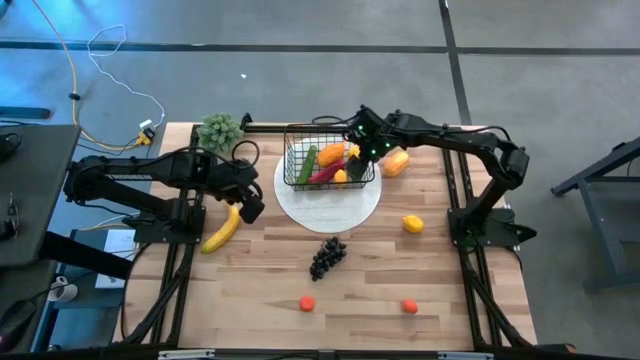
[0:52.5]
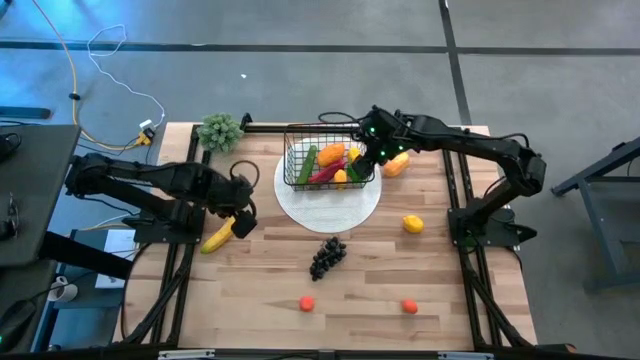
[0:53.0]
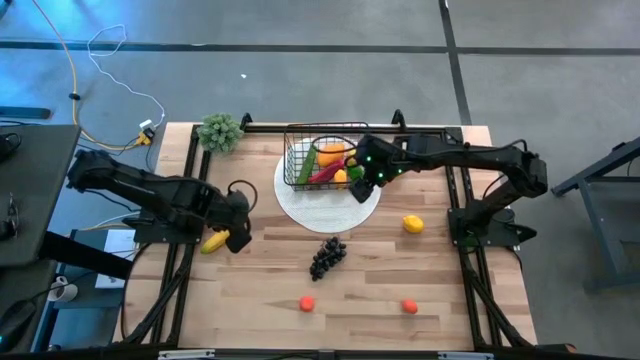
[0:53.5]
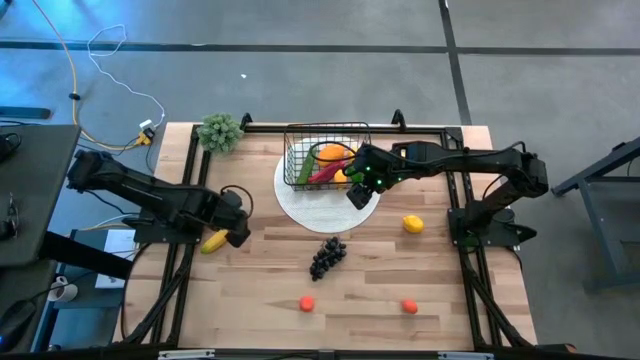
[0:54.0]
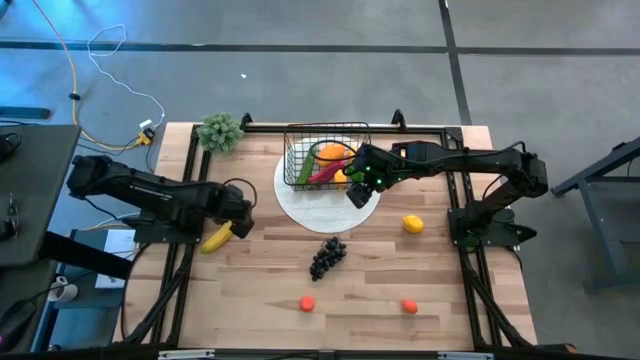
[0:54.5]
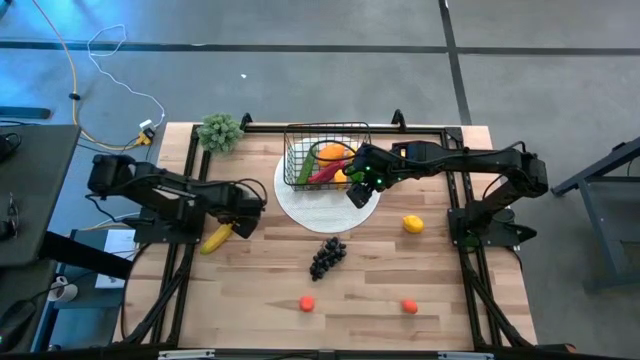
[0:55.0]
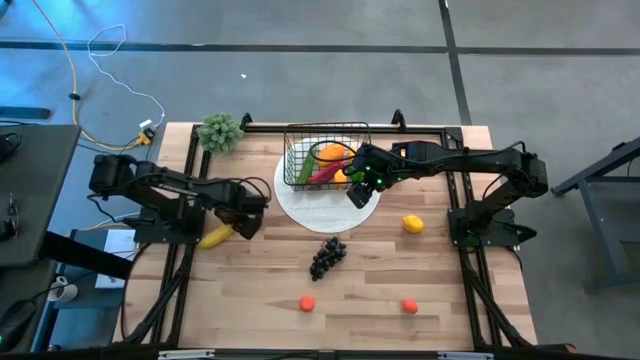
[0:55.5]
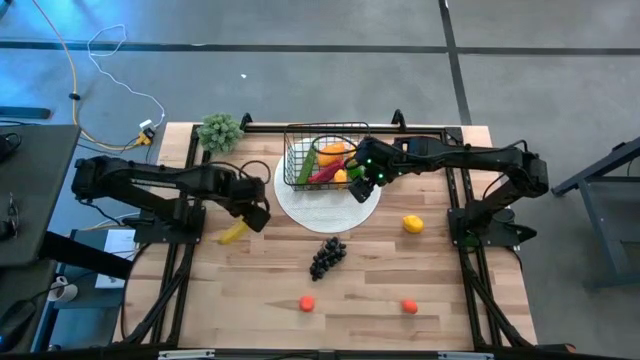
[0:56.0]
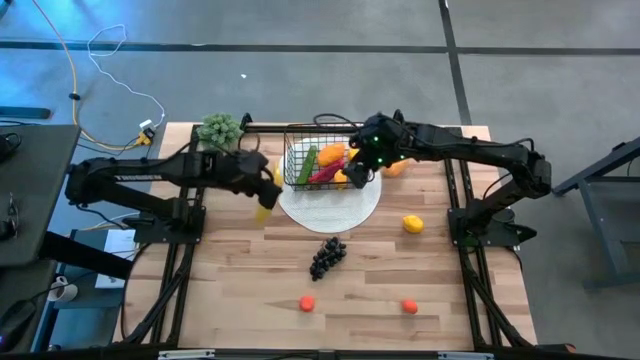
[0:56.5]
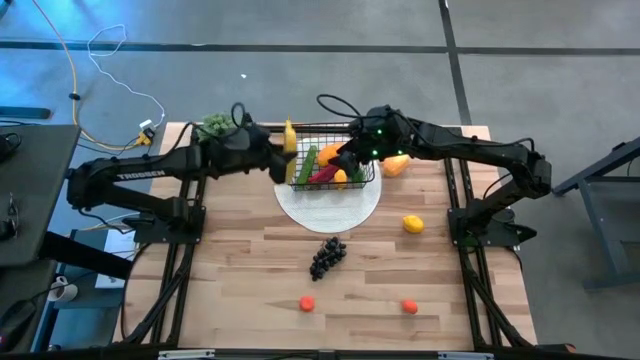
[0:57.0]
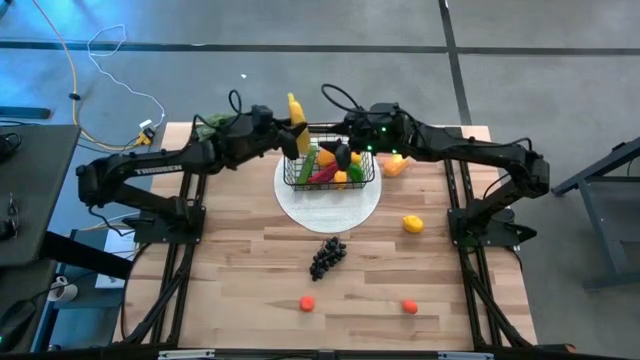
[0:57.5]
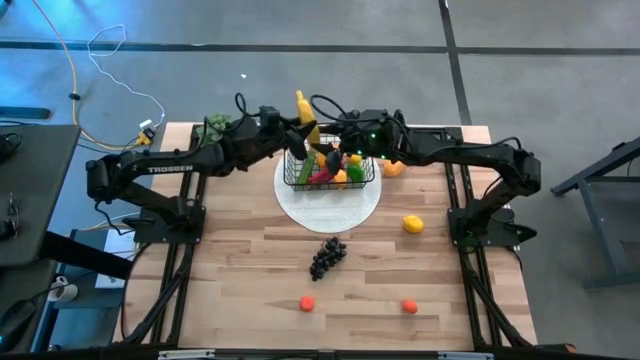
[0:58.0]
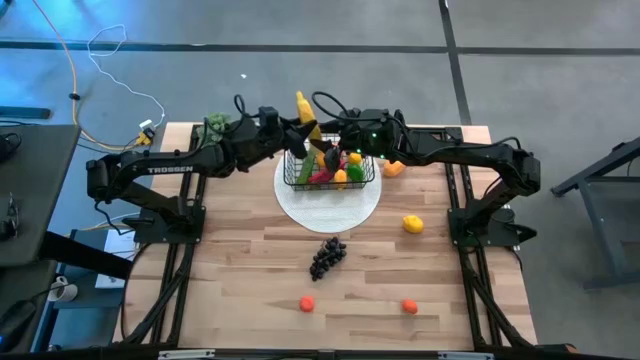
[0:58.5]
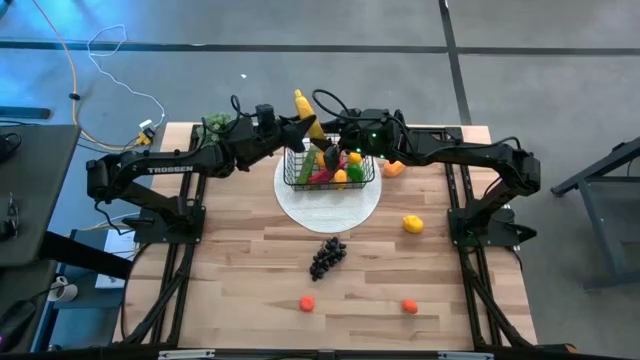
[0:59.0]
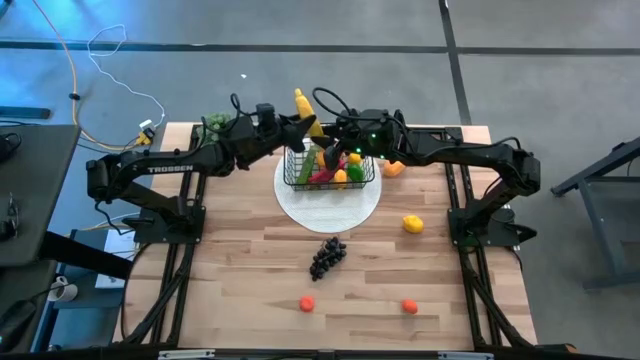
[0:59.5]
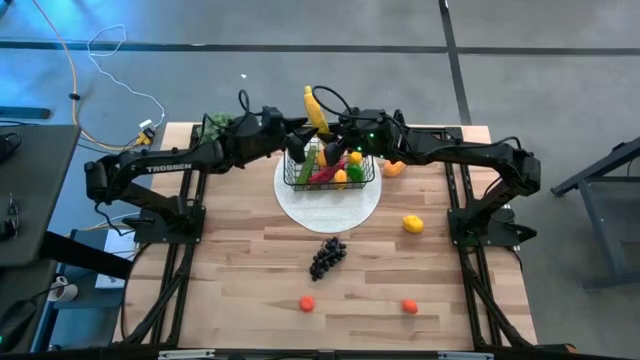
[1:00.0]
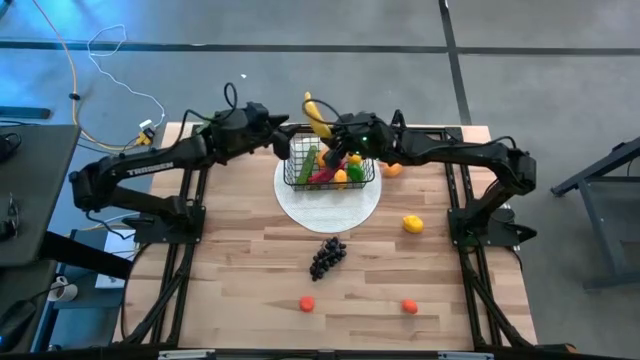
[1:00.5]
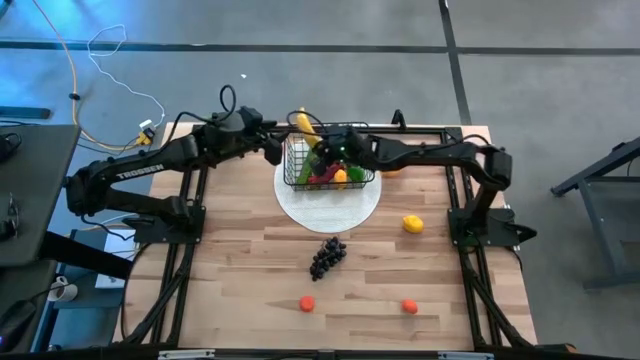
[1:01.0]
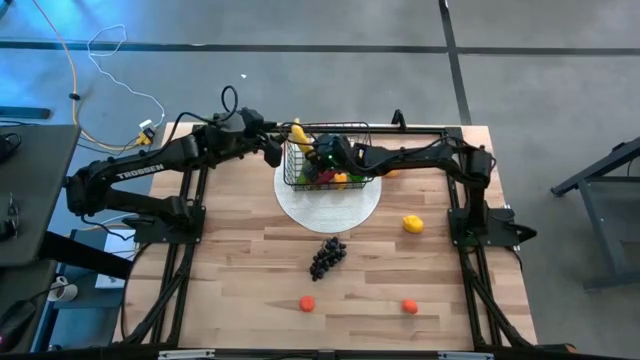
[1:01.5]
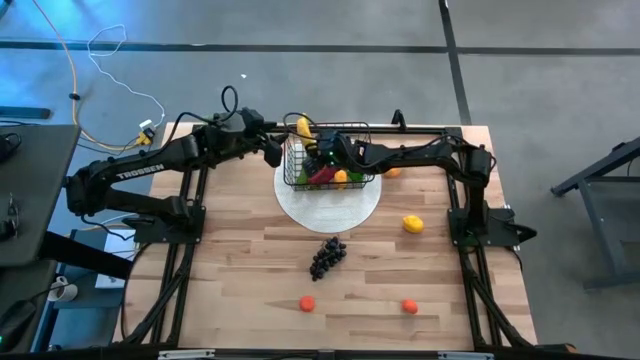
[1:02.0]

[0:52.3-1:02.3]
Task: Build produce basket
Put the yellow banana into the black wire basket

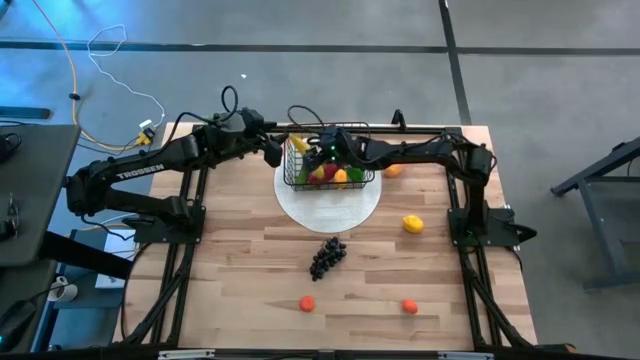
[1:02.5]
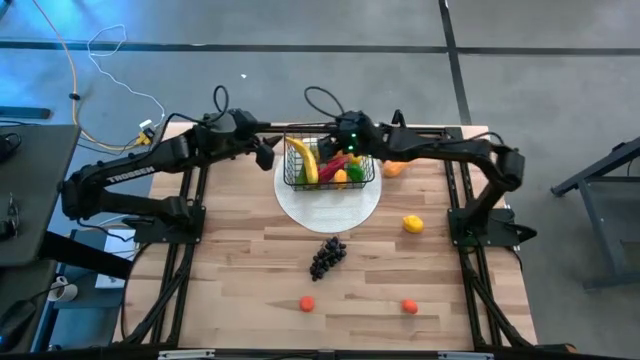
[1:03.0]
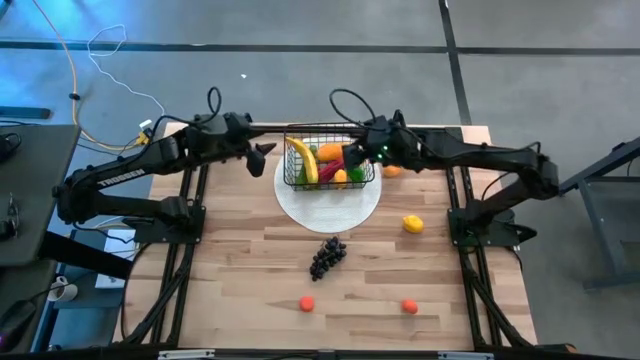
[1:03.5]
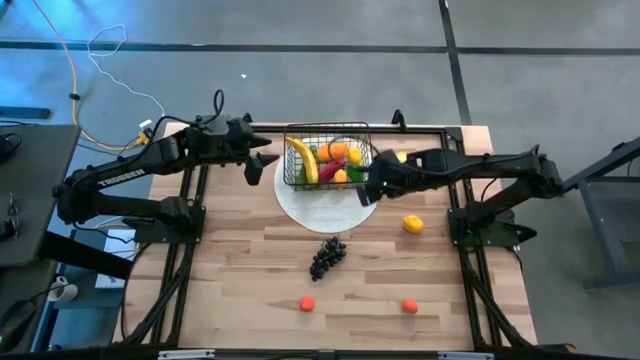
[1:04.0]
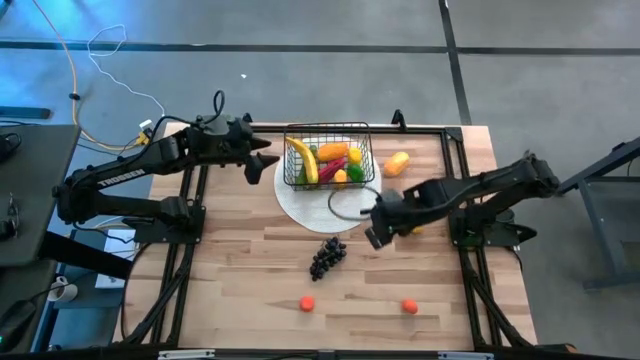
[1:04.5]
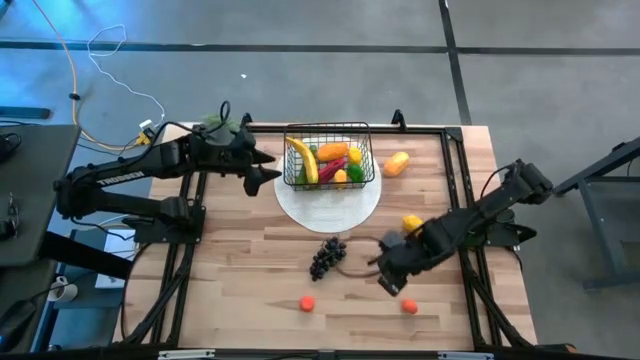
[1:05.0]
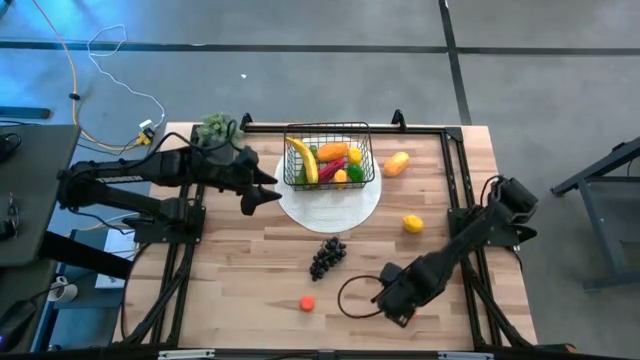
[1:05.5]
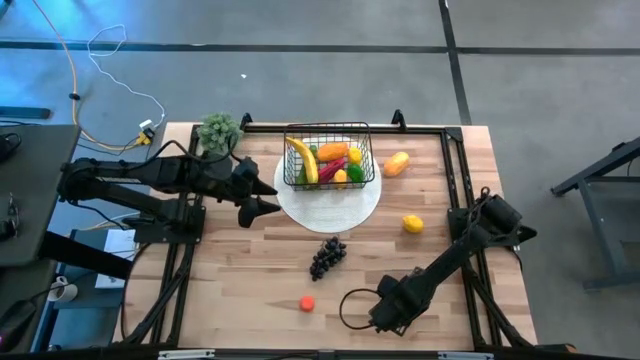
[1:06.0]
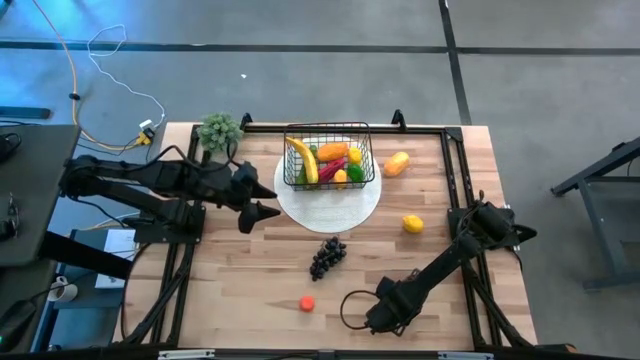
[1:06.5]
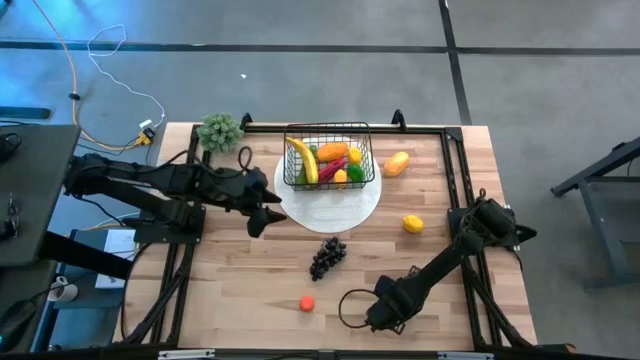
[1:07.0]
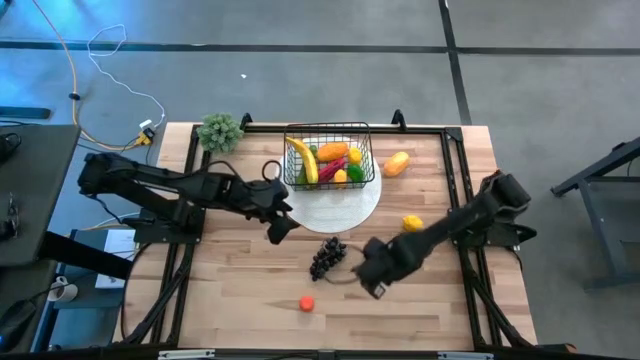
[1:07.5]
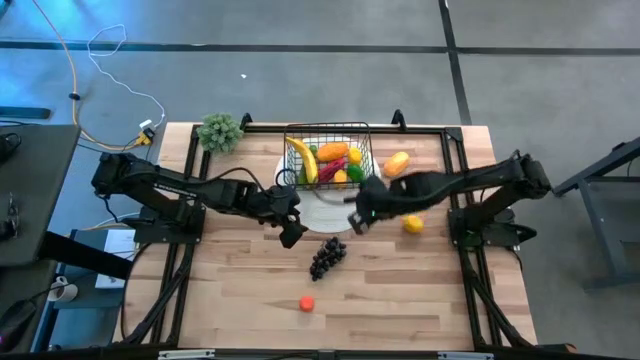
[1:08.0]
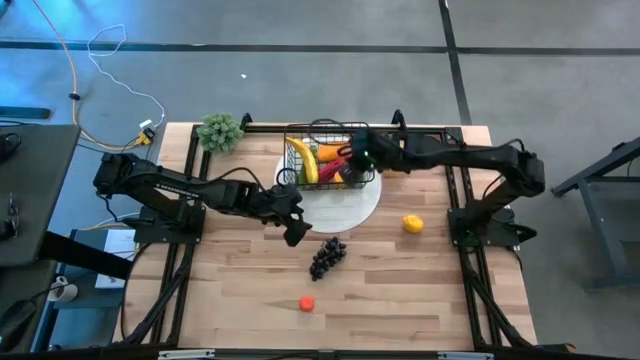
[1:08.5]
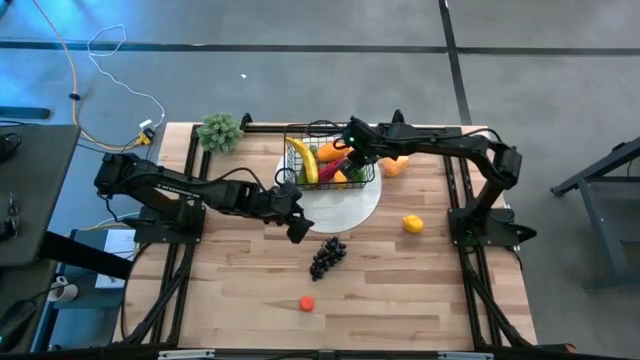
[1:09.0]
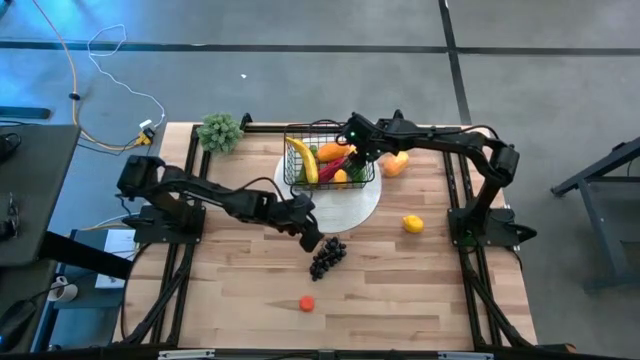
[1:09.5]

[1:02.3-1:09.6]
Put the right orange into the black wire basket

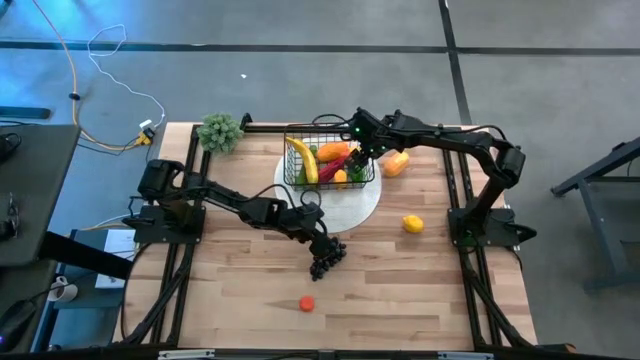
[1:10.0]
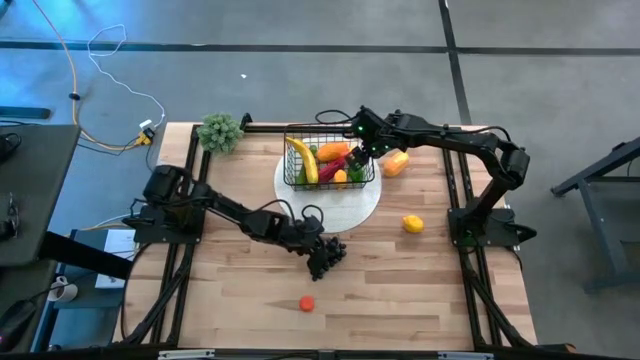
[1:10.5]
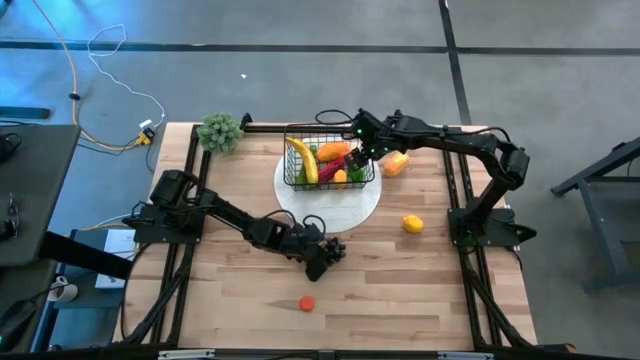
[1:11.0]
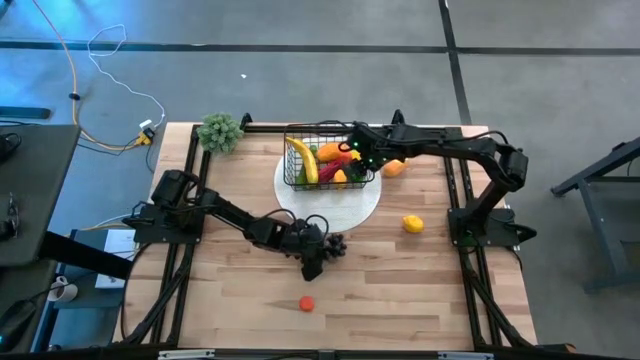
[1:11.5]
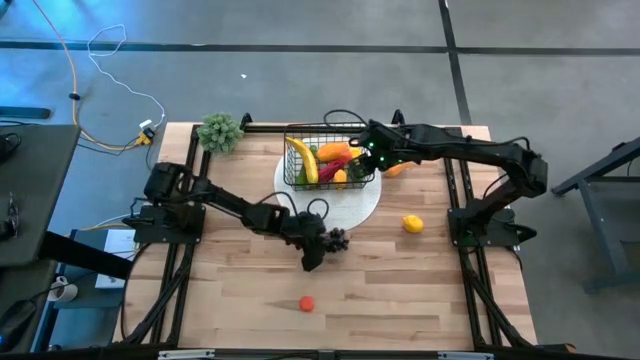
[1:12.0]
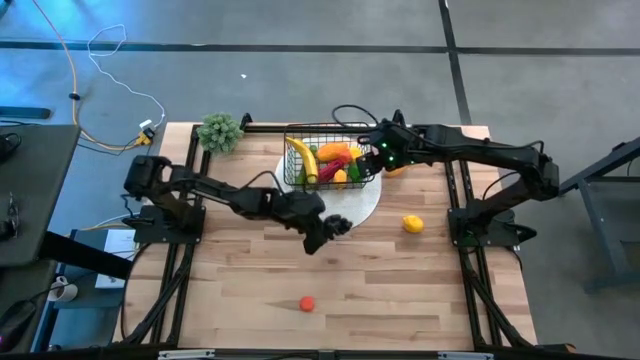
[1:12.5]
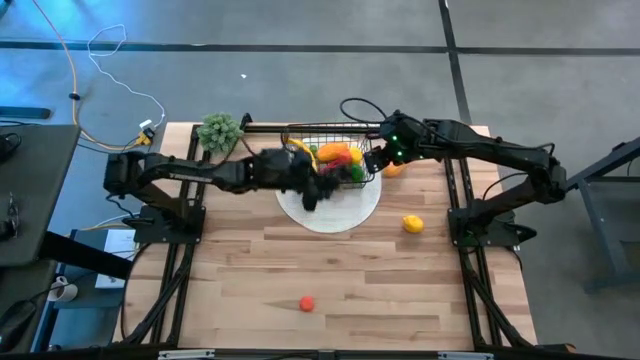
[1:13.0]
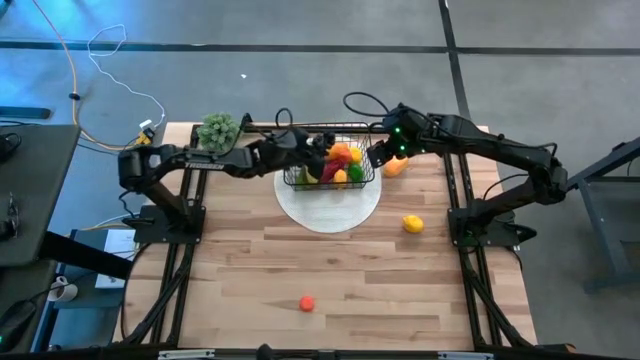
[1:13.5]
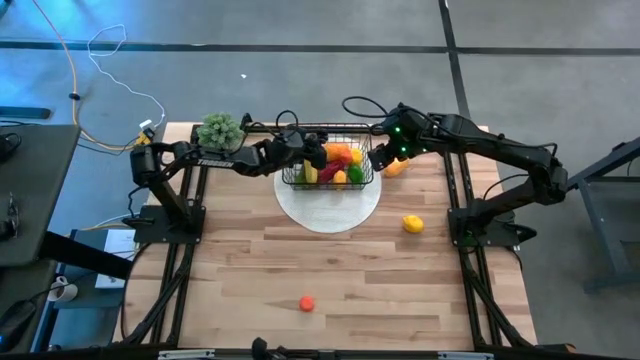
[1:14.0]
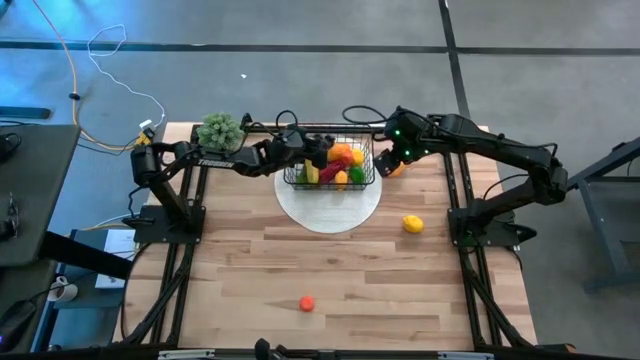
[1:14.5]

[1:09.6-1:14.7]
Put the black grapes into the black wire basket
